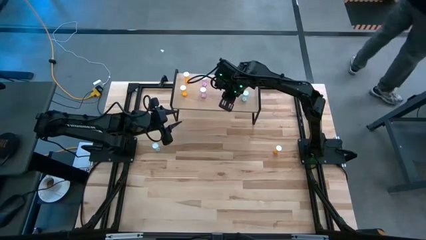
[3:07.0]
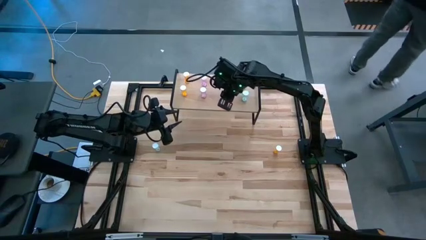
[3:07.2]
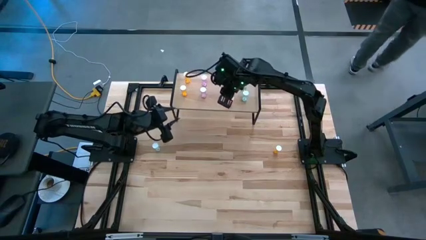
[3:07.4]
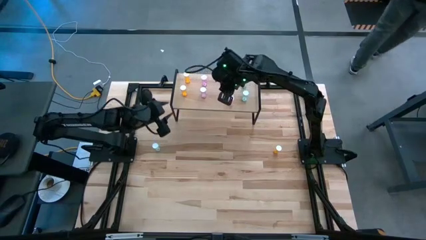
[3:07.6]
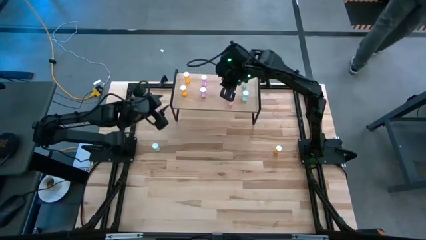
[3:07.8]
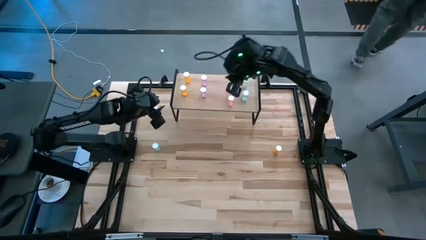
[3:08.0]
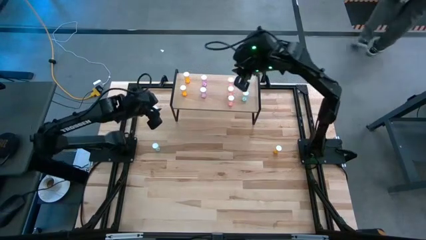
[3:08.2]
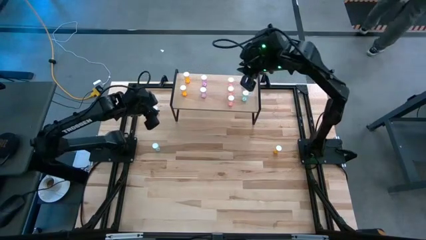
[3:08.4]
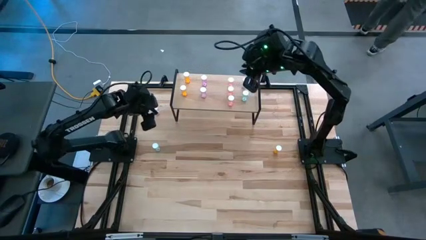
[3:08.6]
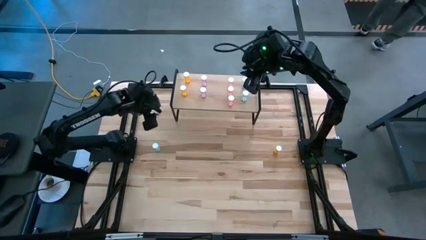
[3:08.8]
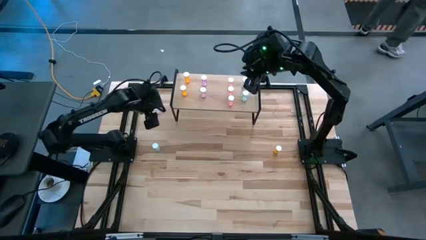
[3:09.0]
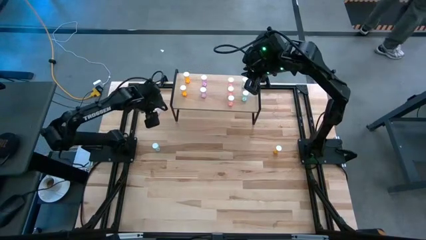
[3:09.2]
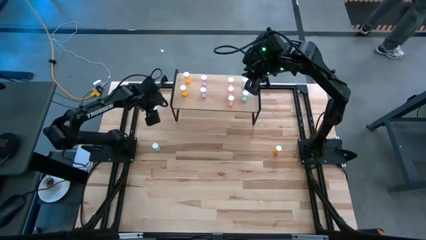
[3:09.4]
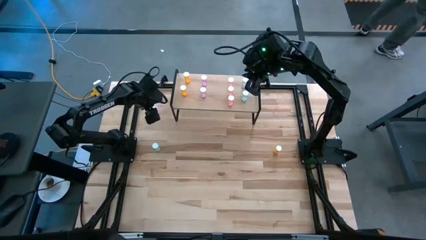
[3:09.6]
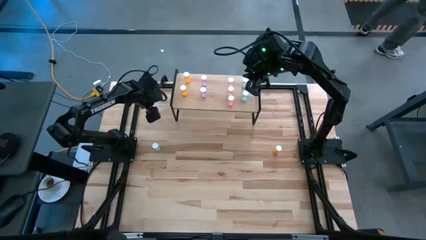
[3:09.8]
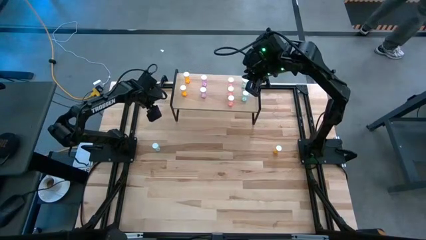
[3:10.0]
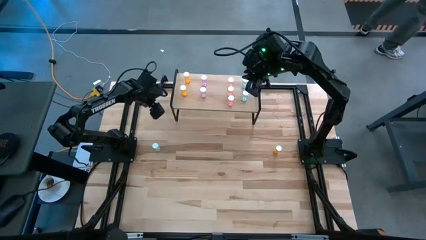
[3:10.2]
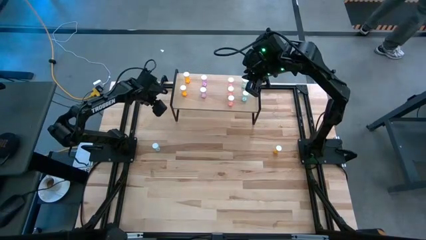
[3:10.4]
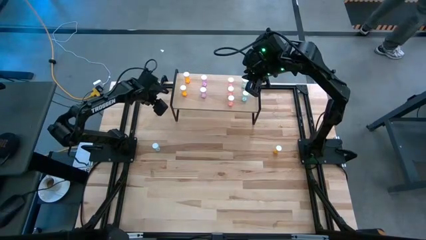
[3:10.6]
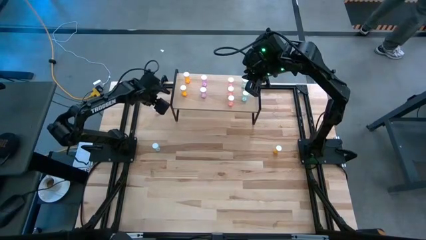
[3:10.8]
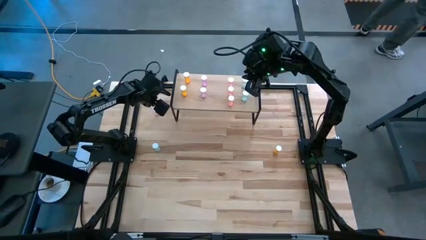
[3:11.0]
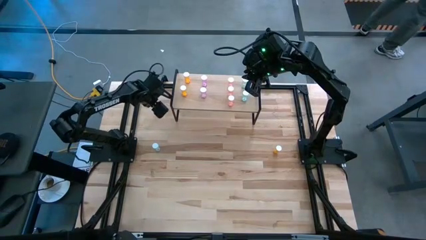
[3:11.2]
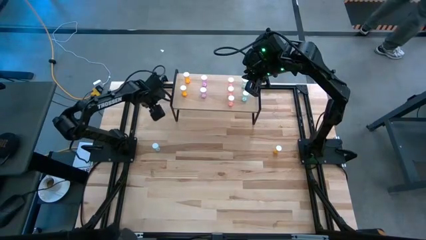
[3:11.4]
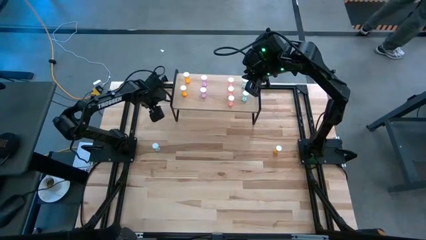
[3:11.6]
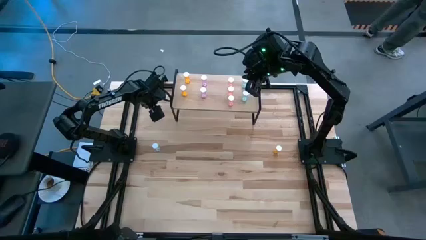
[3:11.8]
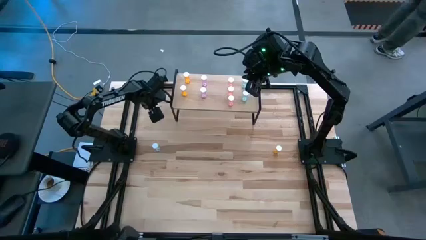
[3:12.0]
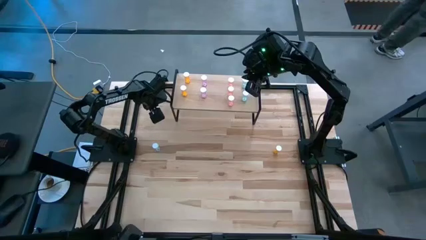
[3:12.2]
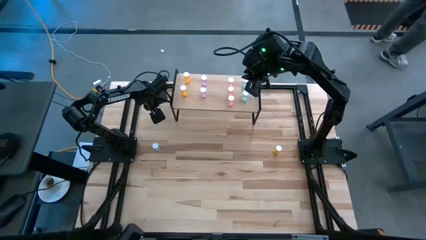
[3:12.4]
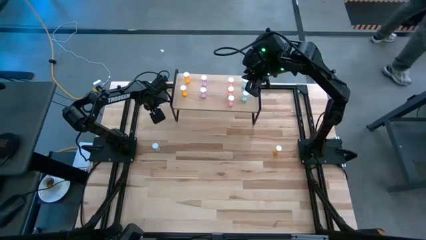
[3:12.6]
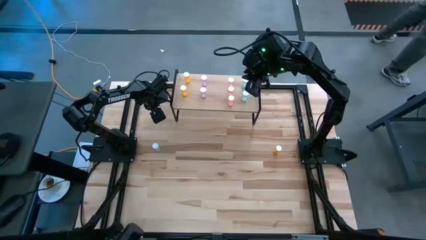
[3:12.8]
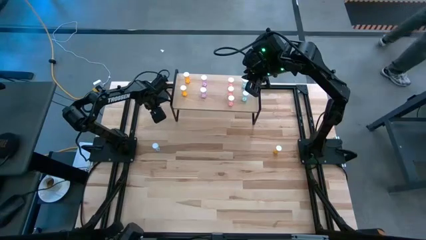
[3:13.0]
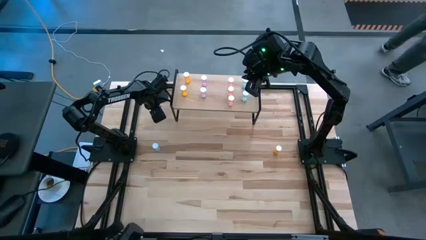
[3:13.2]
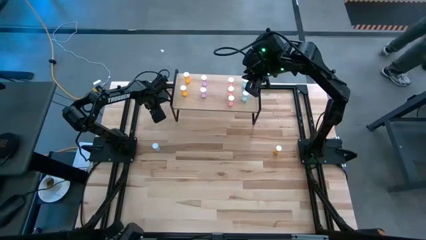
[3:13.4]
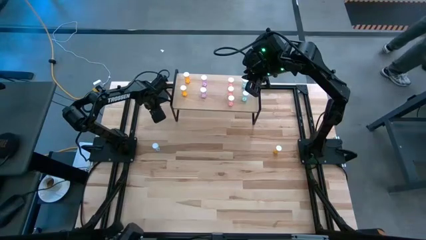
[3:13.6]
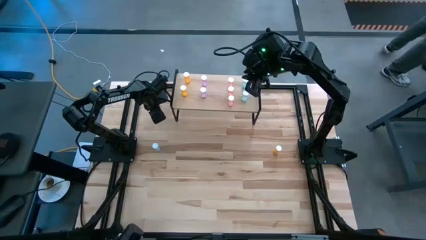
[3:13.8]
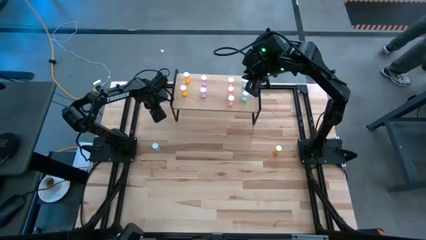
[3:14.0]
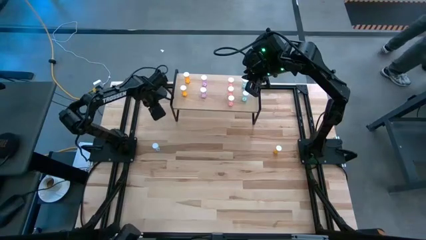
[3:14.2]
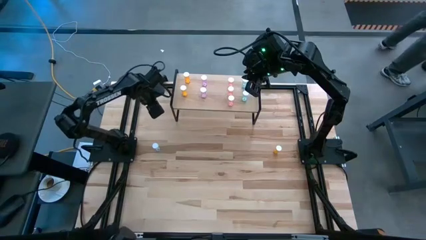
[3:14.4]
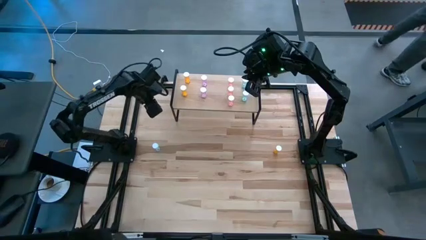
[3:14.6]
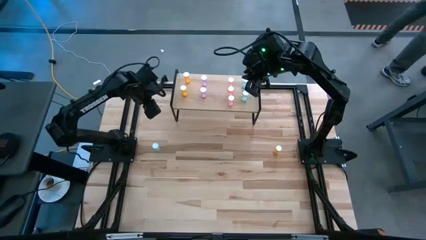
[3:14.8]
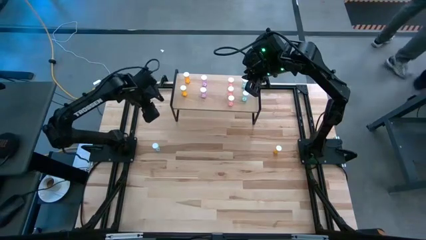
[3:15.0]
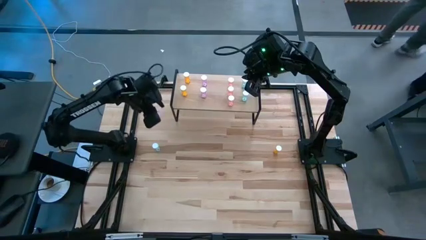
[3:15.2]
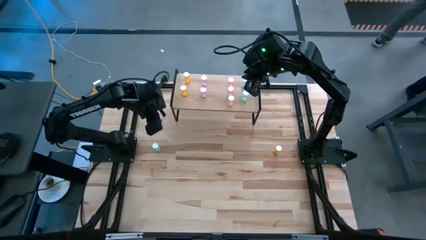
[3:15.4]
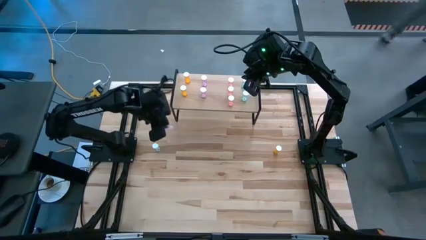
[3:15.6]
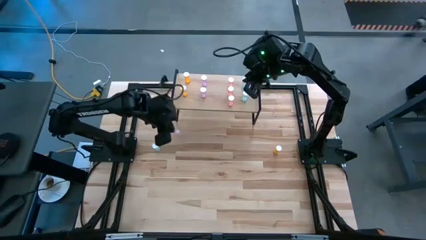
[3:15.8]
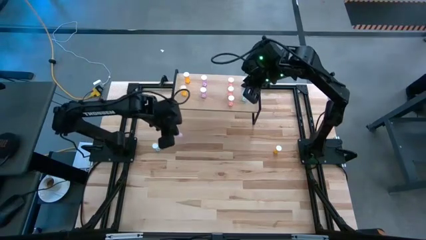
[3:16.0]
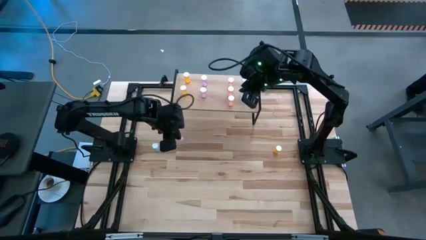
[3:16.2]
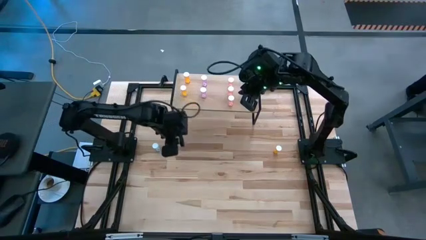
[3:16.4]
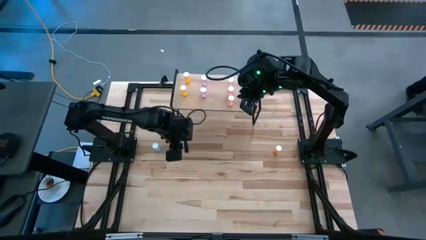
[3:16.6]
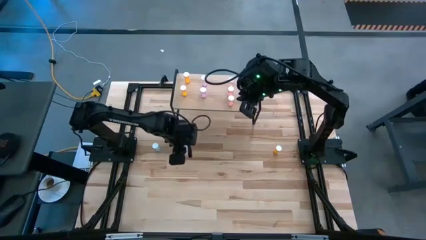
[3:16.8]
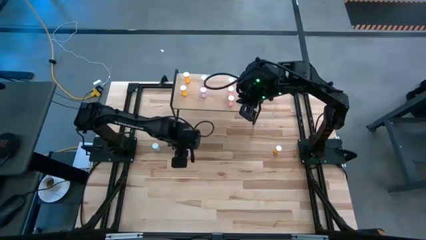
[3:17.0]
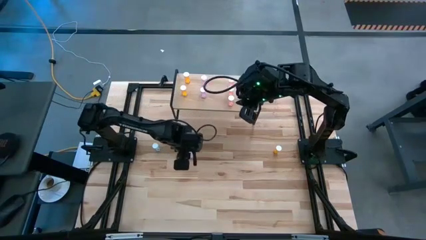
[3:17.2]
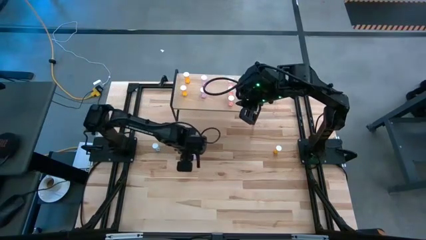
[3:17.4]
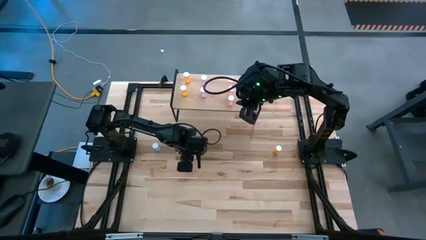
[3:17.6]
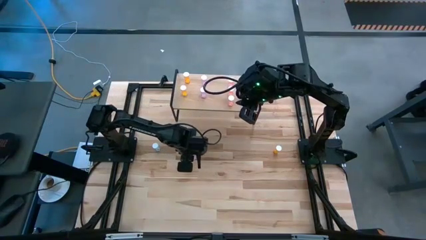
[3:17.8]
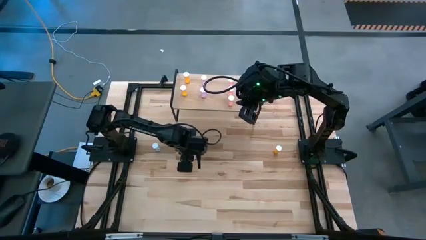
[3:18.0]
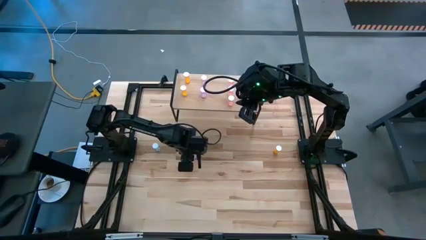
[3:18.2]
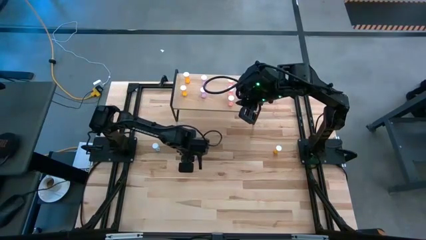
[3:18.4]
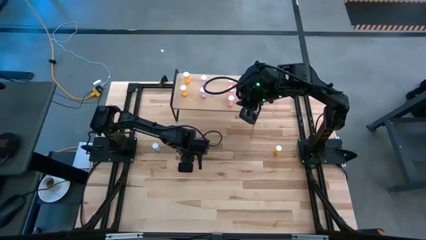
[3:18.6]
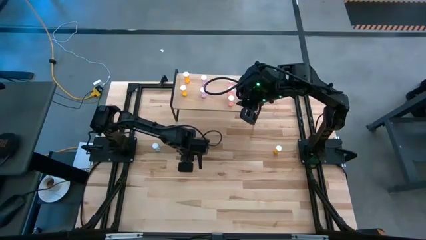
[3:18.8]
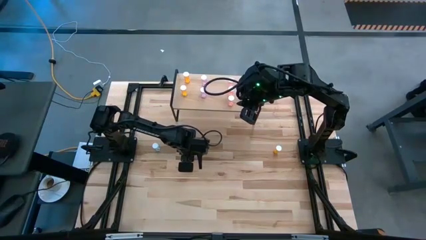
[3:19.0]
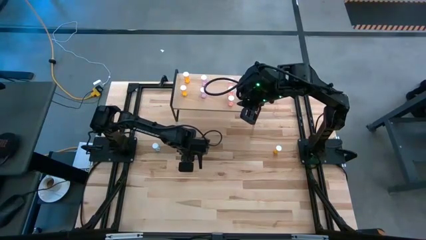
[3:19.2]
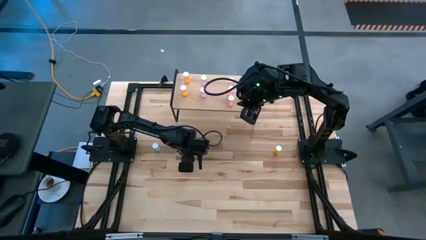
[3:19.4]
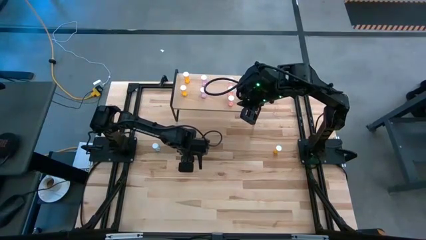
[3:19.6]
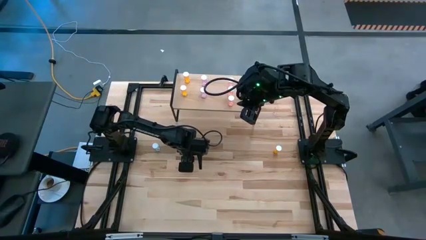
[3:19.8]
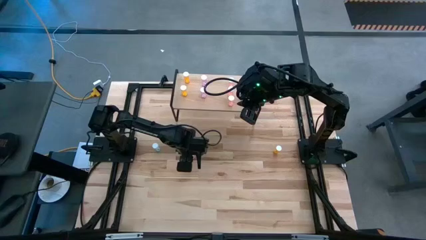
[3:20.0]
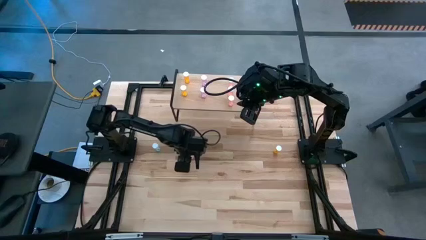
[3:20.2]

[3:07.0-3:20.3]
Task: Pick and place medicine bottles onto shelf by color
Put the purple pill bottle on the shelf aligned with the other purple pill bottles
